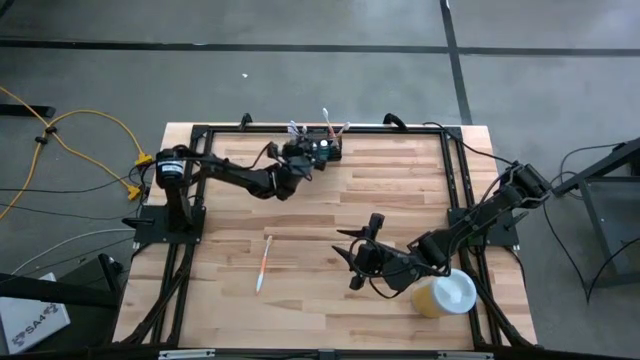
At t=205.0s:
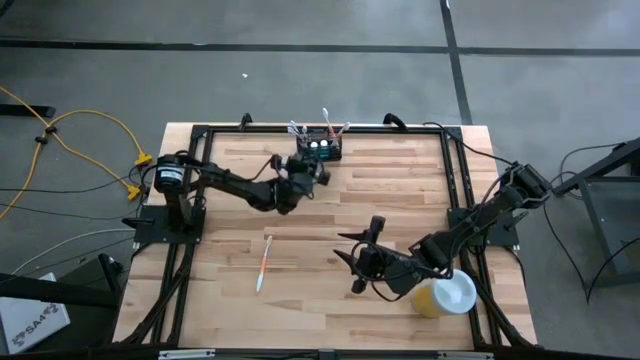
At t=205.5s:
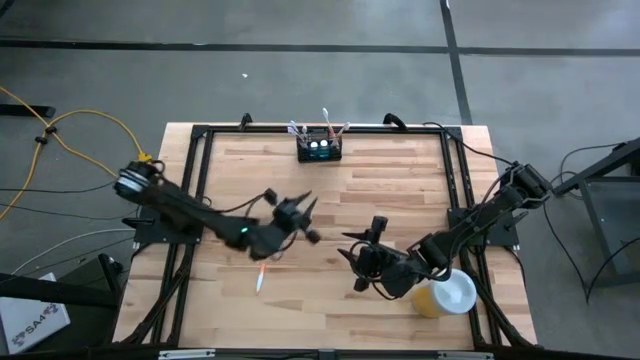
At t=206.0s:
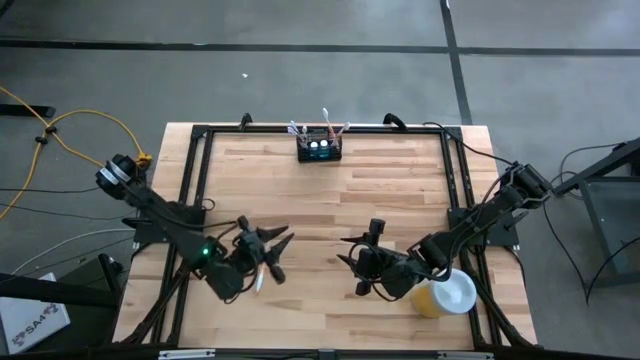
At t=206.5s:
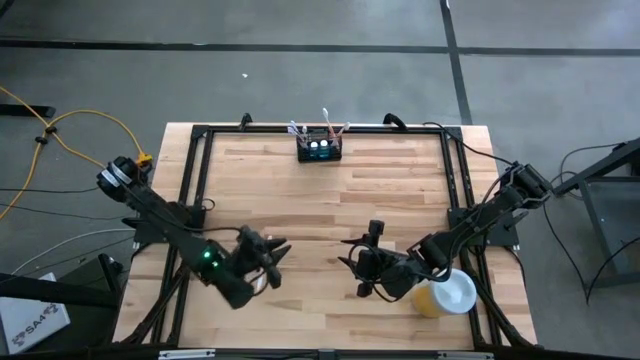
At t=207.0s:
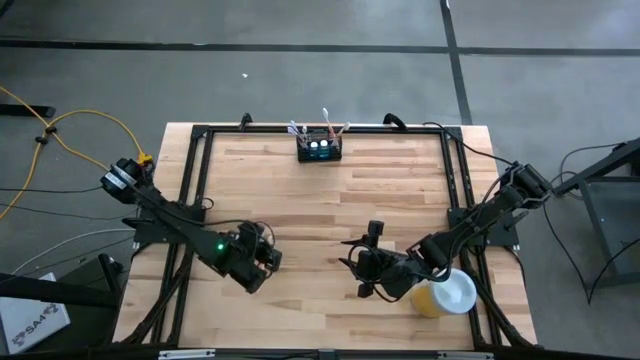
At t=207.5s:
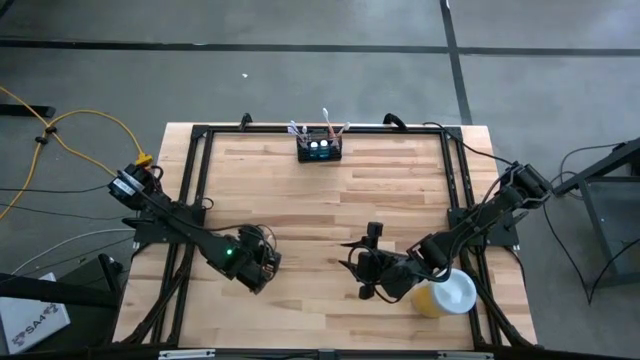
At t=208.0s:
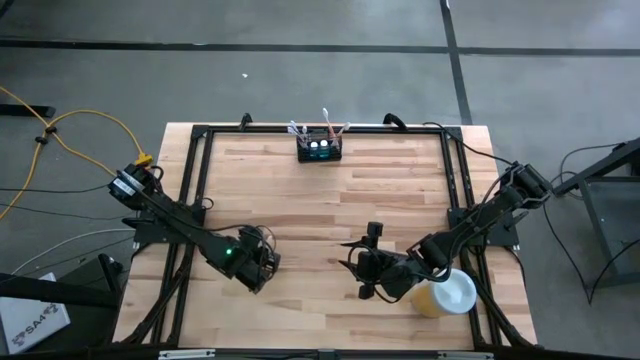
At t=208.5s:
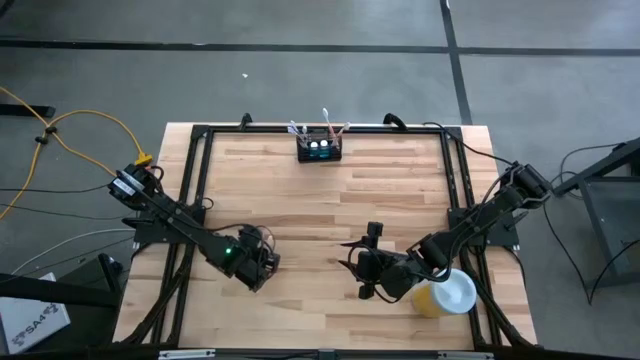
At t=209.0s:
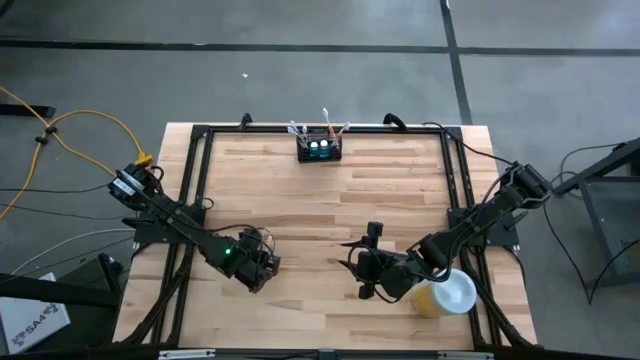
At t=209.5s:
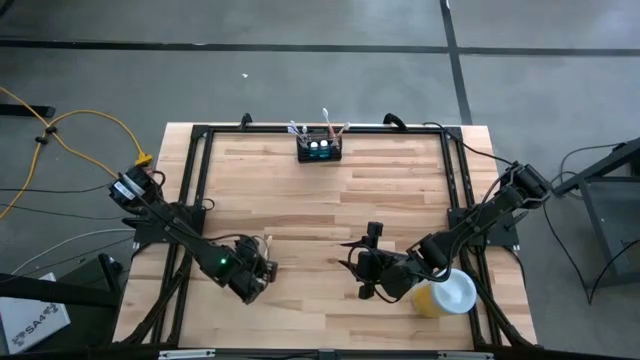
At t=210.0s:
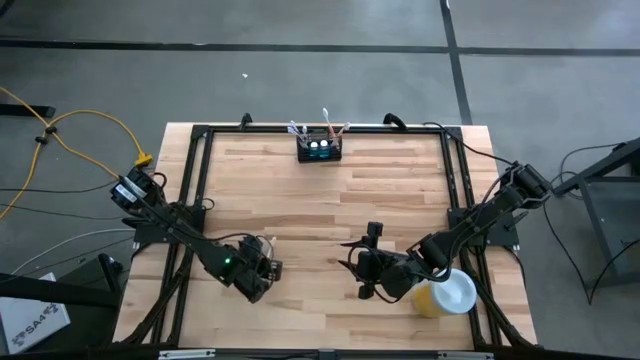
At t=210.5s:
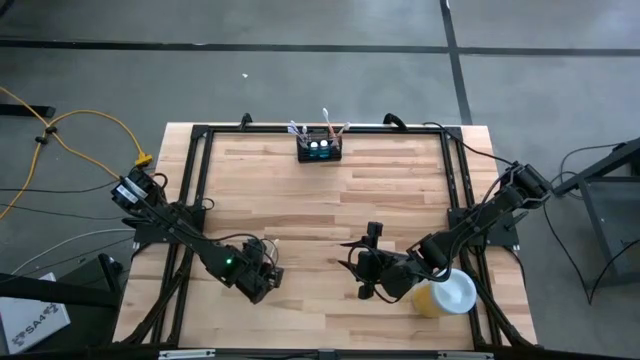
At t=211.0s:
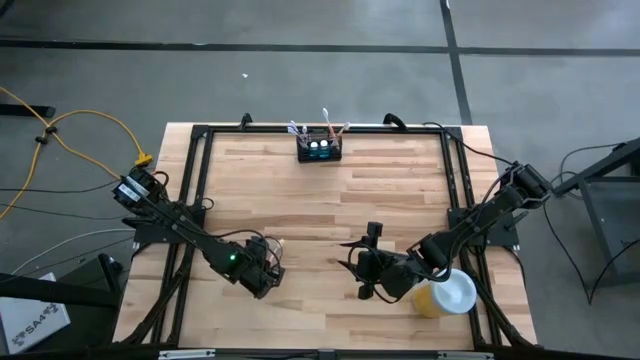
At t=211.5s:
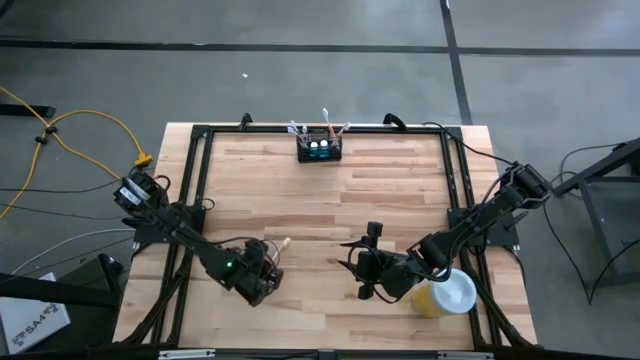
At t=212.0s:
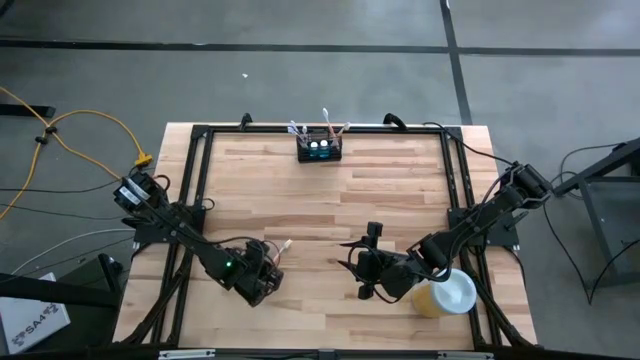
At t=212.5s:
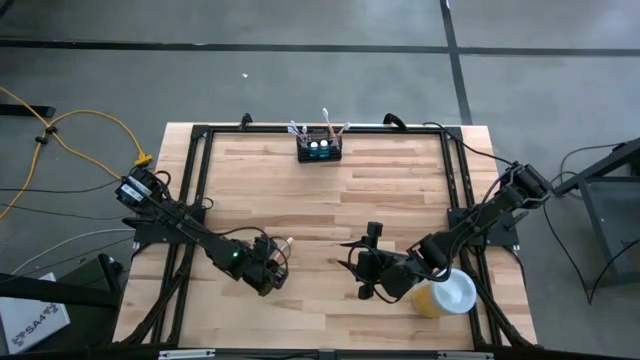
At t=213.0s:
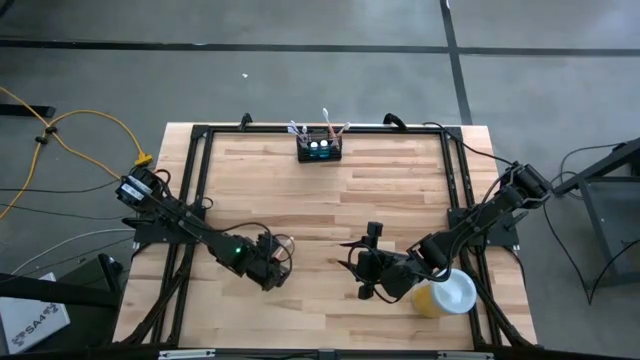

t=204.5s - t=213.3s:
Task: Pick & Place toothbrushing station
Put the orange toothbrush into the wire organizer

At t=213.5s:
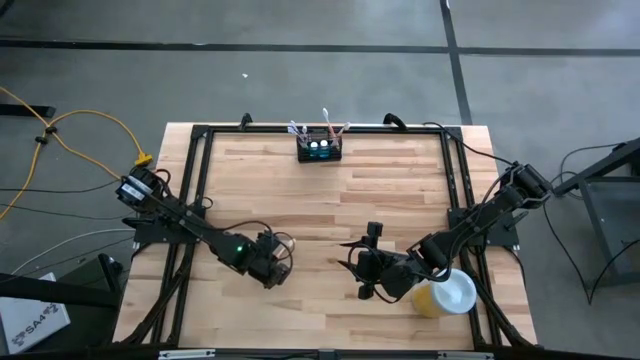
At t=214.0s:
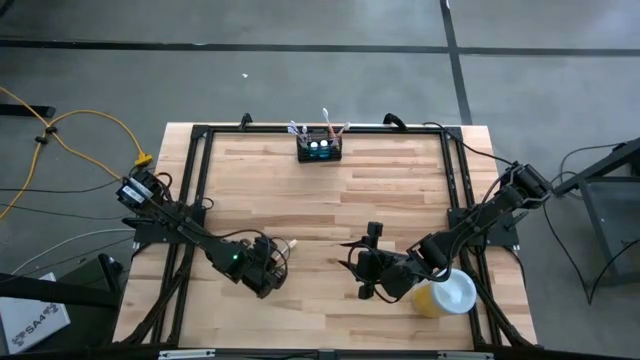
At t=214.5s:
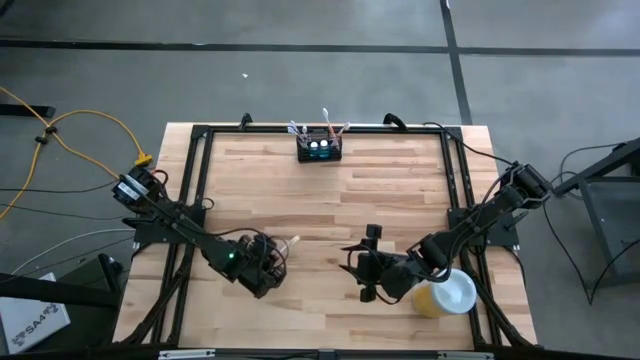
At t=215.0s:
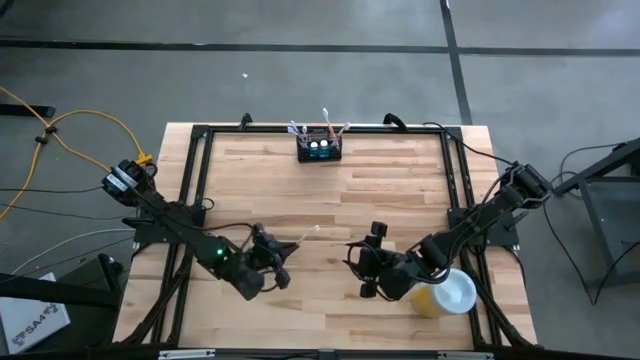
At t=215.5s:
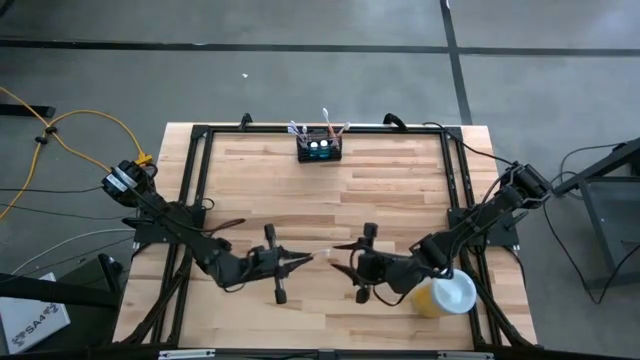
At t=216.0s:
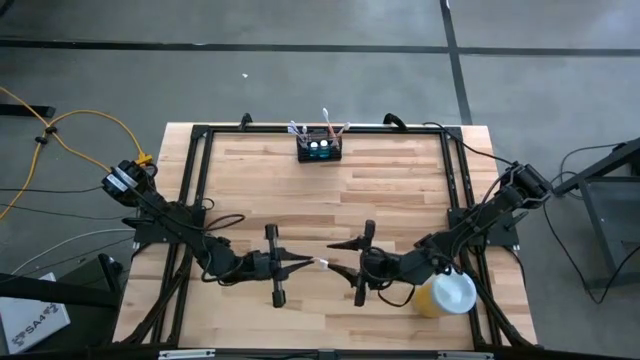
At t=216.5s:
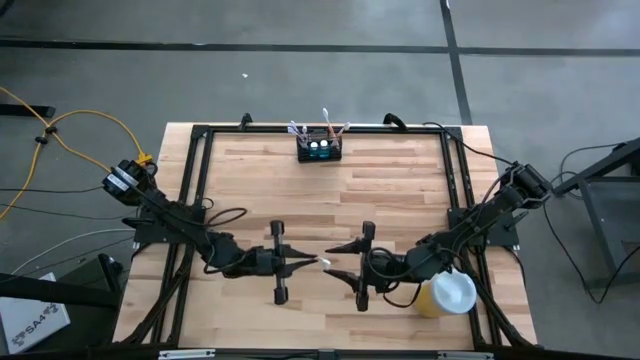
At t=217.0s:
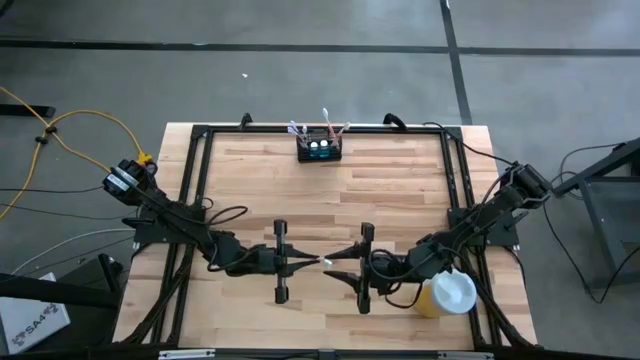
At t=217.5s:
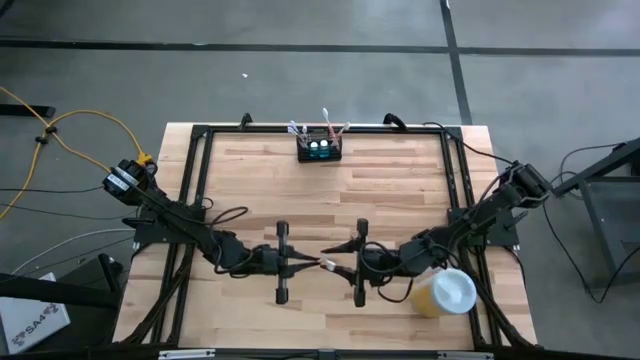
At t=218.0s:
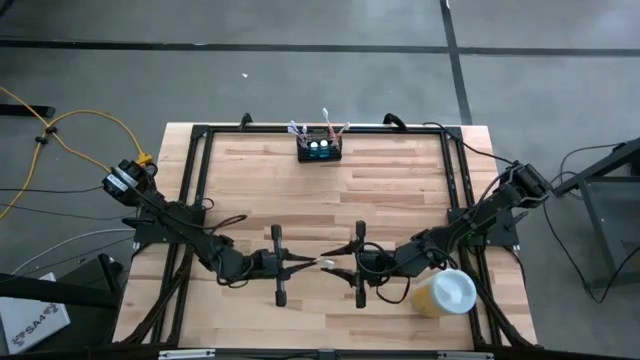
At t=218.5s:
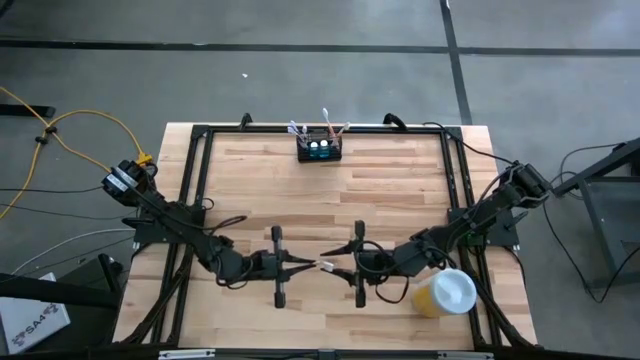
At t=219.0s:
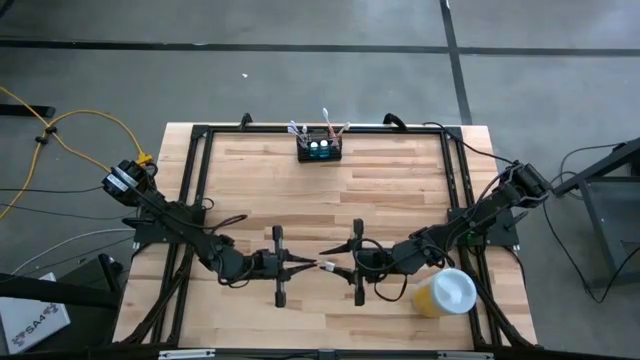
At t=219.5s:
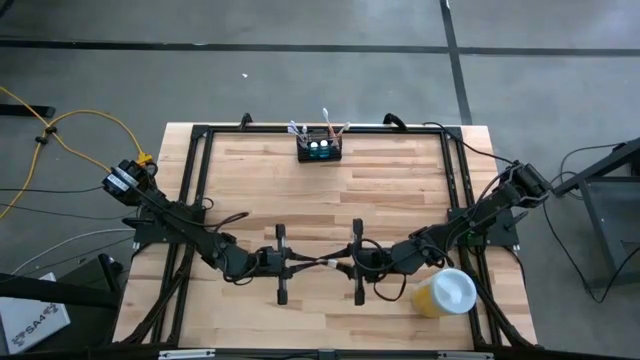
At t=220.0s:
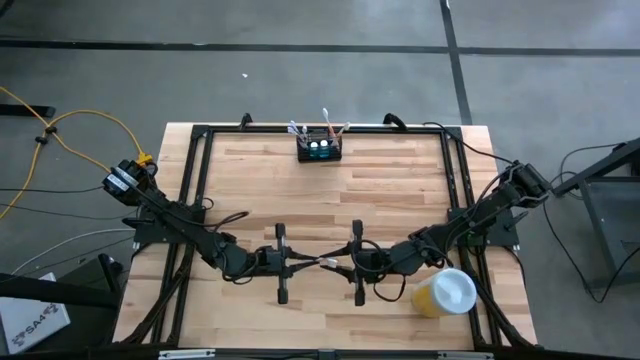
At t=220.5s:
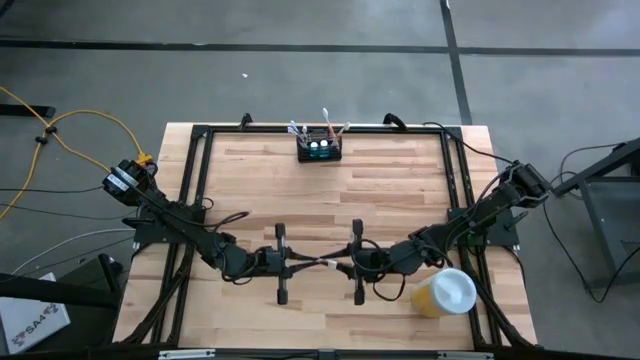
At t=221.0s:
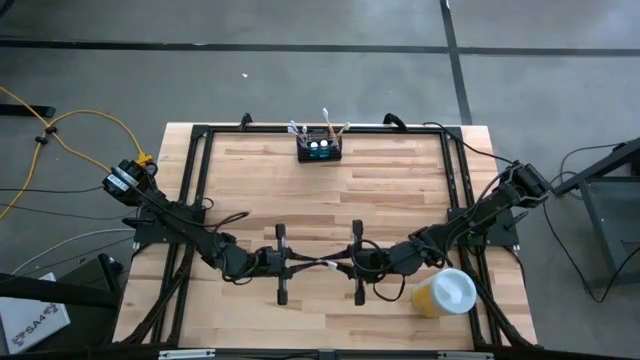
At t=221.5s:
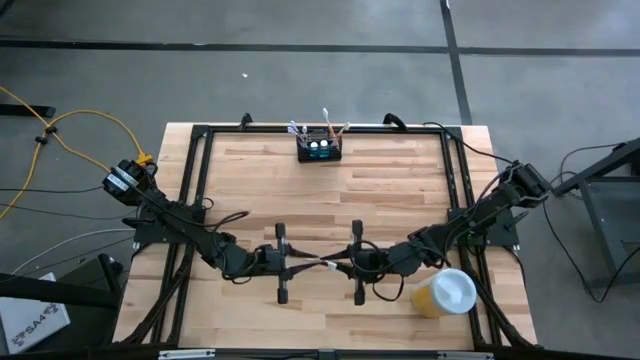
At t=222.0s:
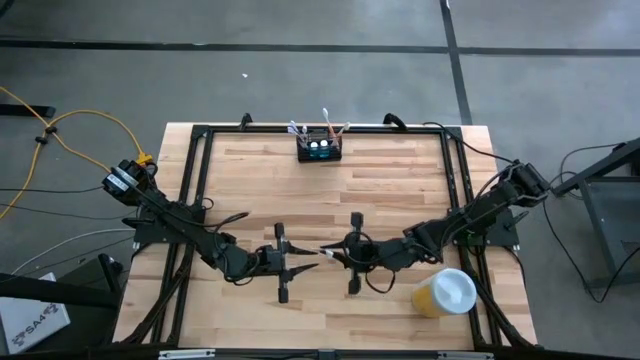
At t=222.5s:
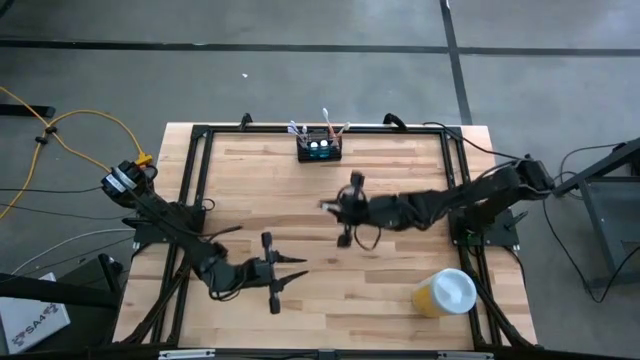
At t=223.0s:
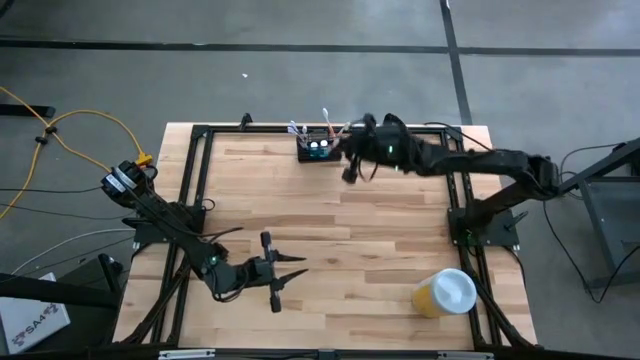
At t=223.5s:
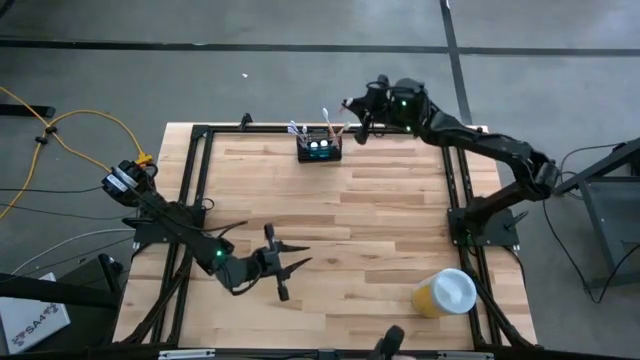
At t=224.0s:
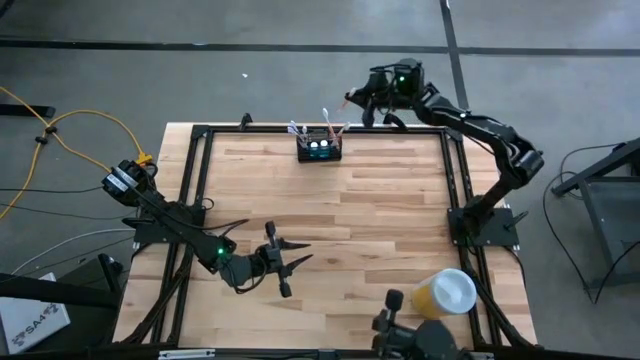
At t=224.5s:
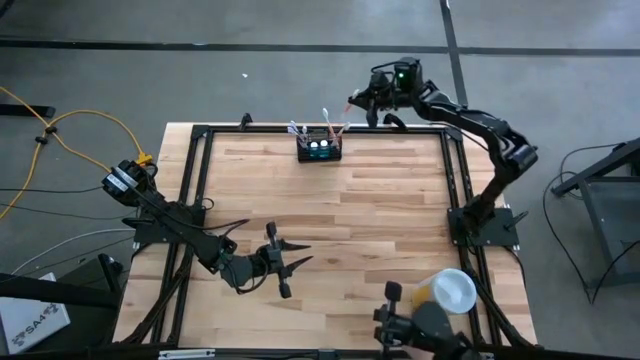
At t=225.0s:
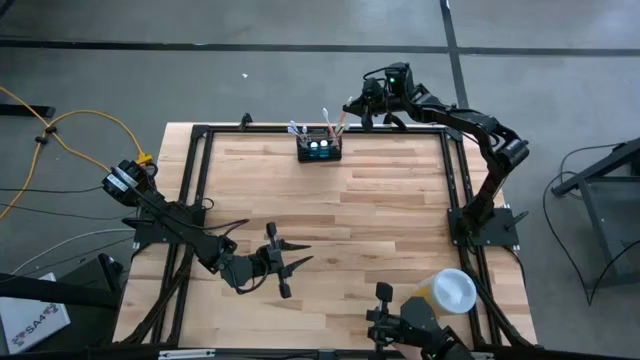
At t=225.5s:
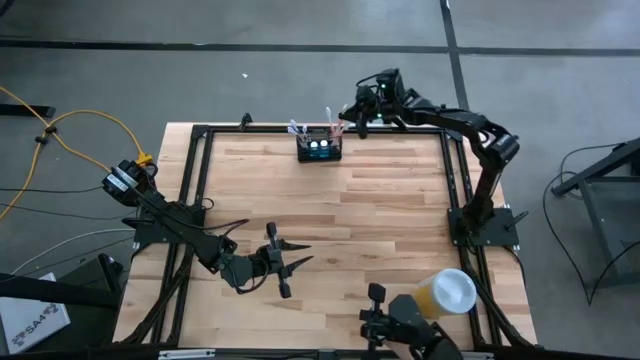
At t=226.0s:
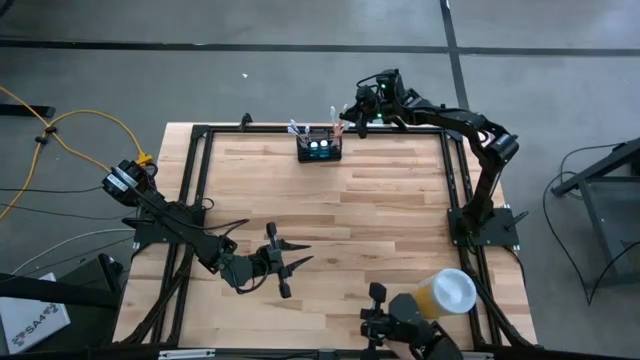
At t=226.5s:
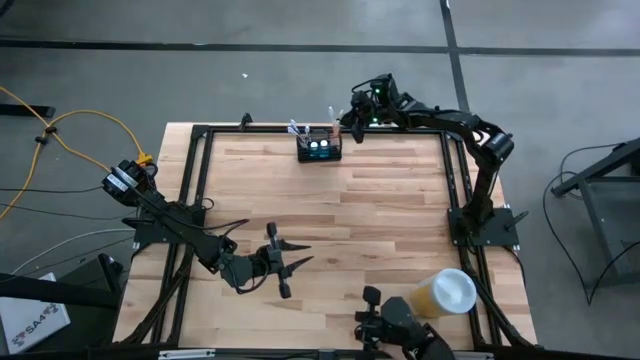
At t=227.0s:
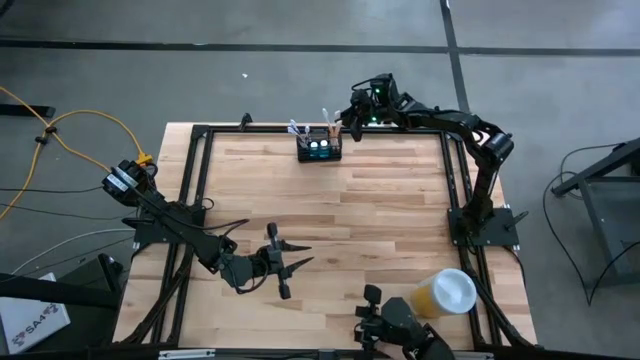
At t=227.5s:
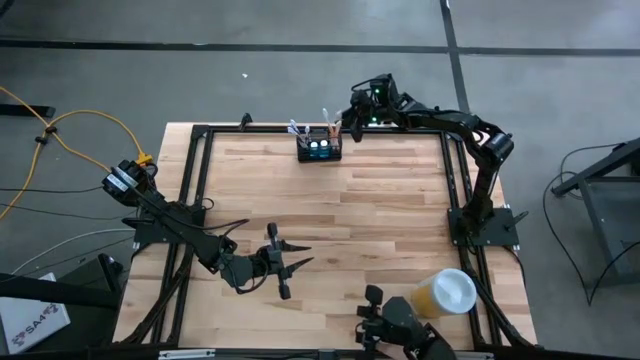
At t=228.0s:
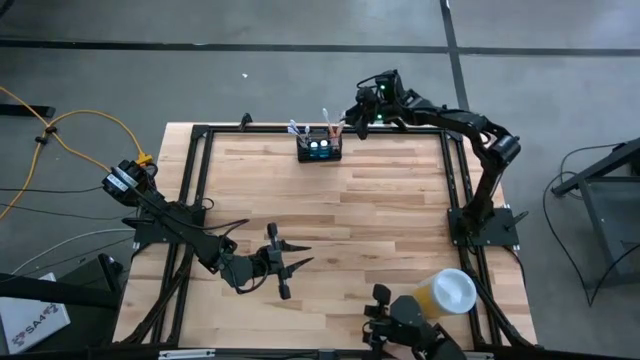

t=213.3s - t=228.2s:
Put the orange toothbrush into the wire organizer
